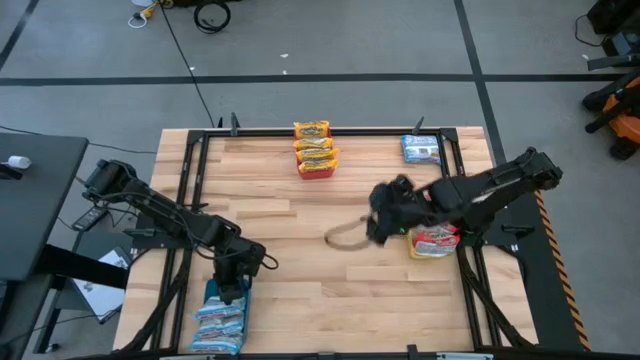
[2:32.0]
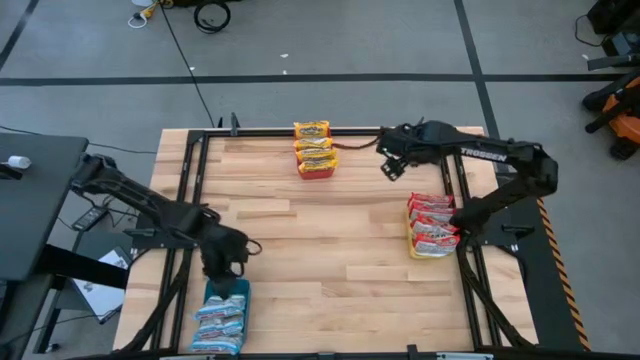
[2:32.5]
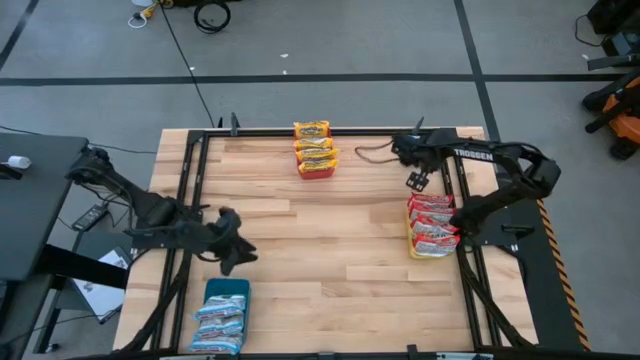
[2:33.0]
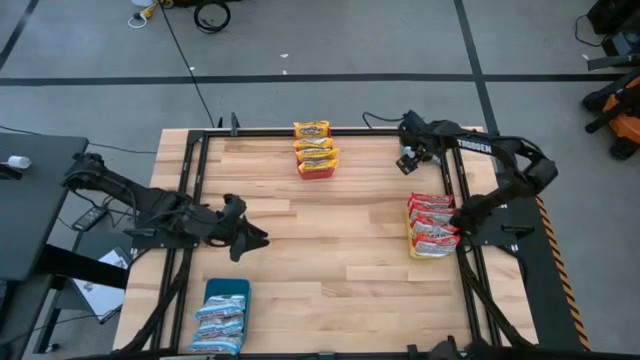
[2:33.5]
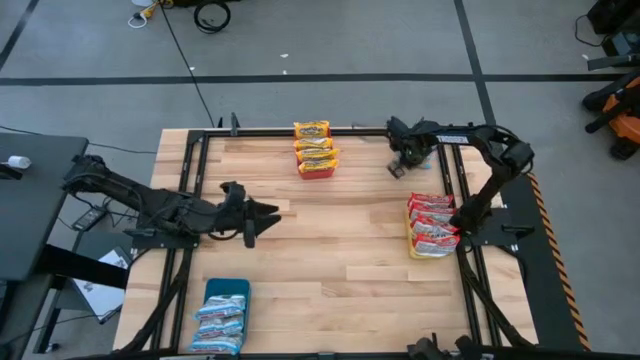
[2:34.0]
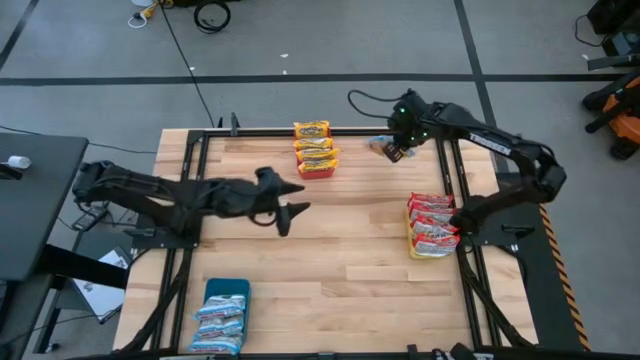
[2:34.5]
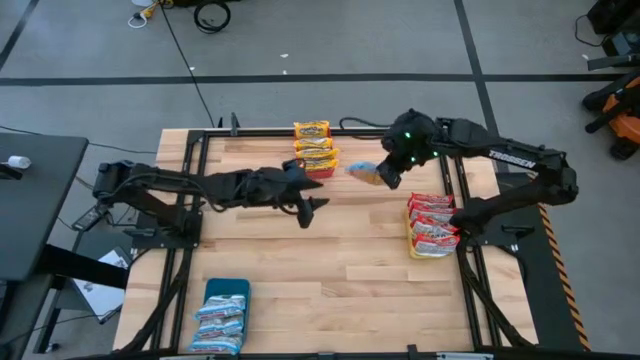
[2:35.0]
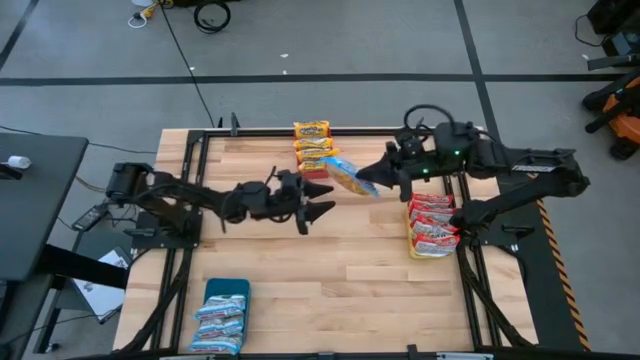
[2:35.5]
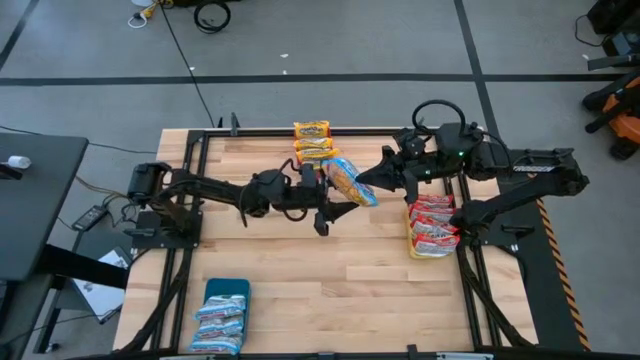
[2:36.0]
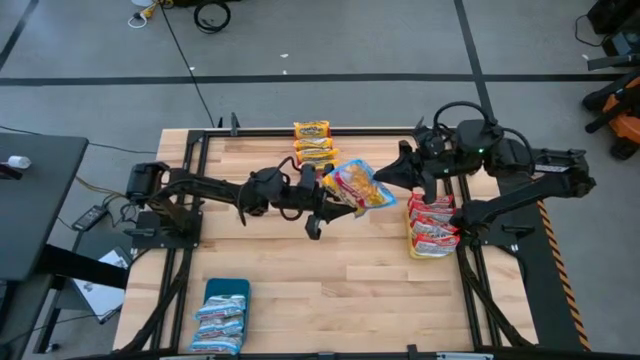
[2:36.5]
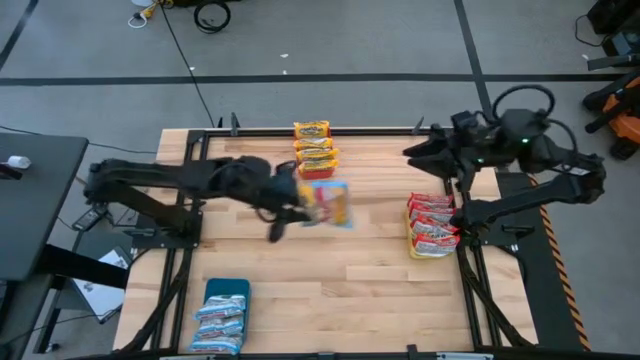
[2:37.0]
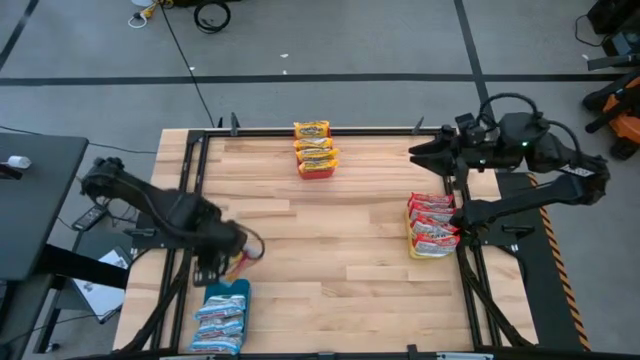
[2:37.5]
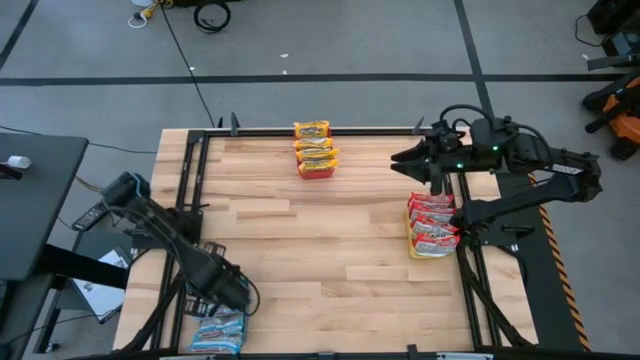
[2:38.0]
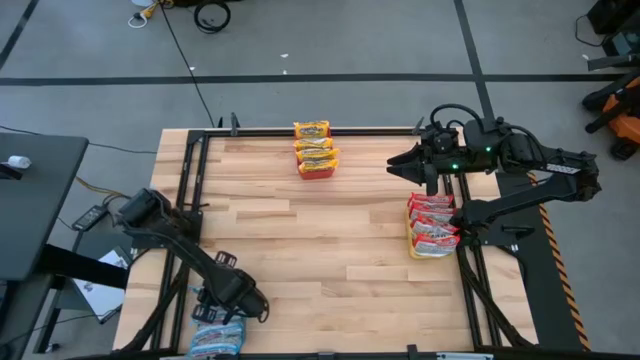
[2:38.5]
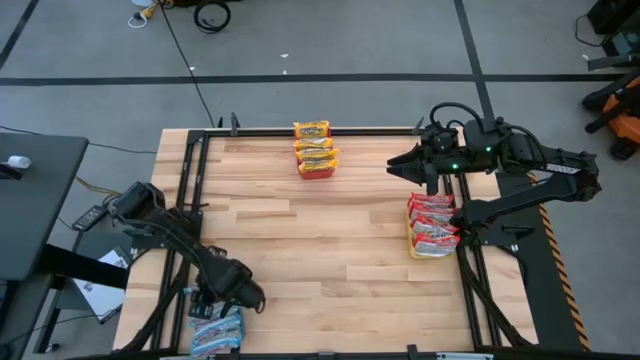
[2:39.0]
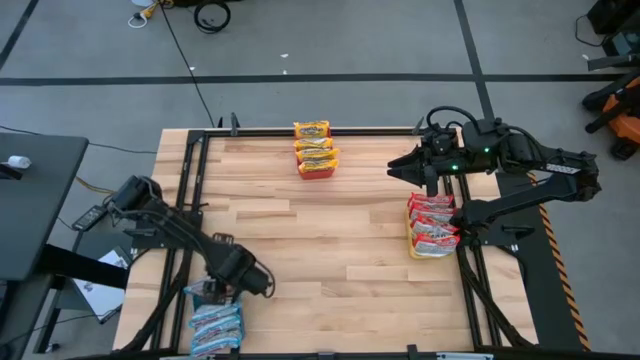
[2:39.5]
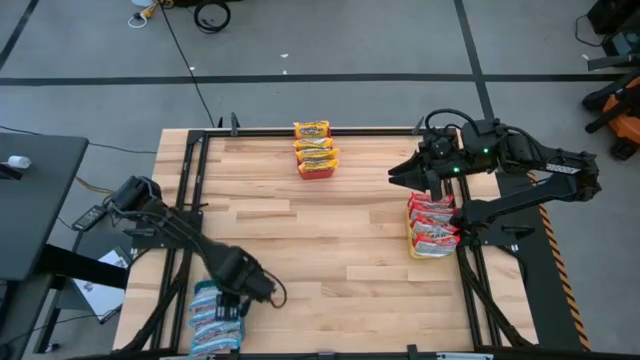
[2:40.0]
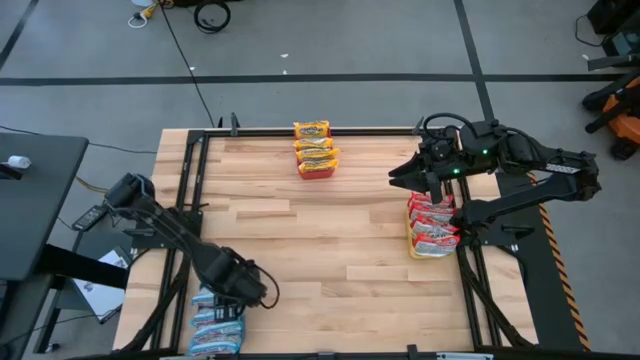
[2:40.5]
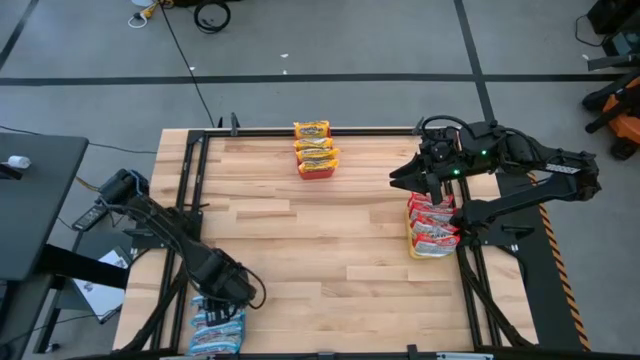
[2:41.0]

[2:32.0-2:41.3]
Task: Sort Maruchan noodles
Put the blue noodle pack into the blue bin

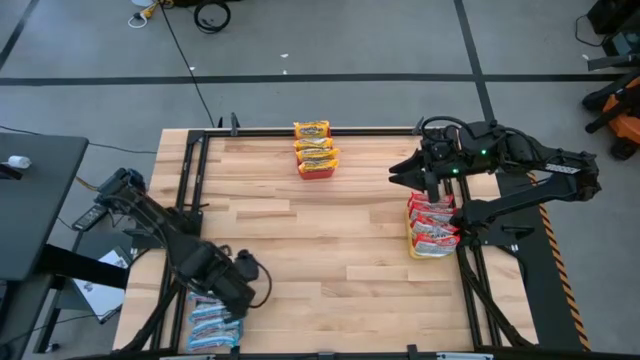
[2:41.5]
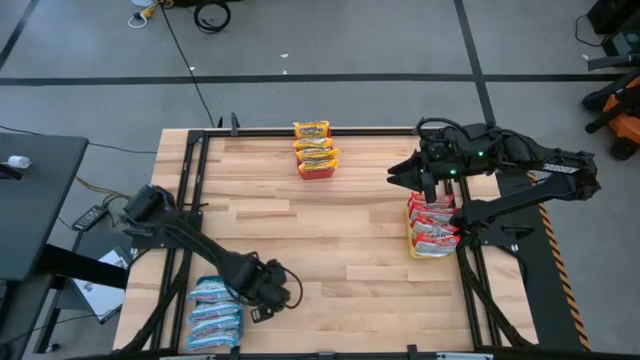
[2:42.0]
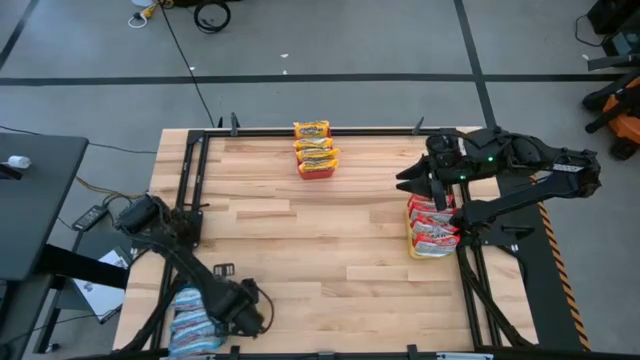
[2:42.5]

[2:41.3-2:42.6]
Adjust the blue bin

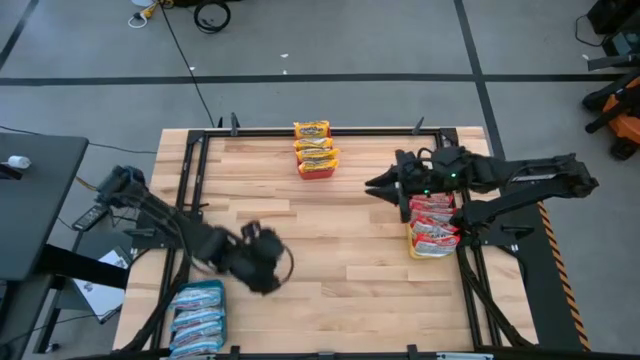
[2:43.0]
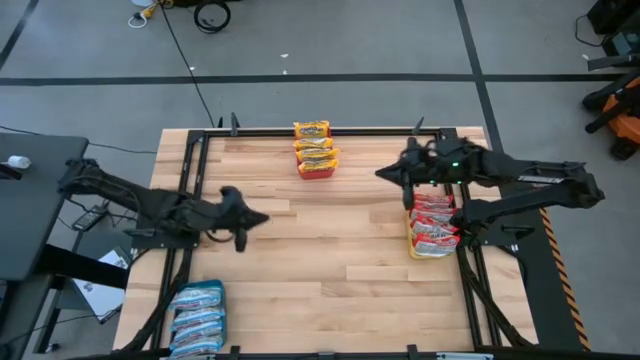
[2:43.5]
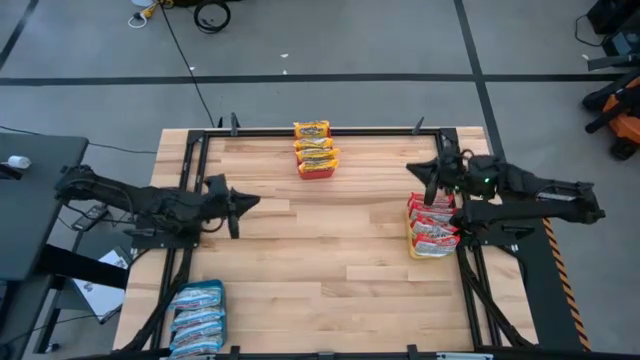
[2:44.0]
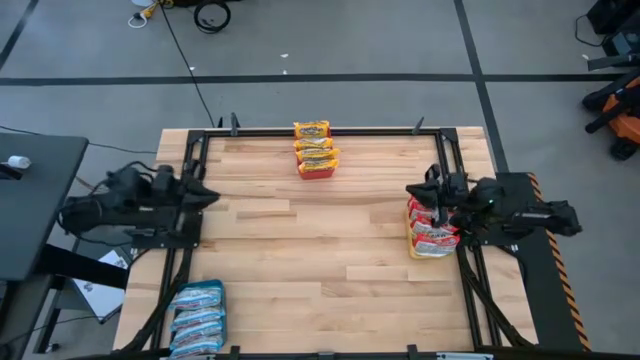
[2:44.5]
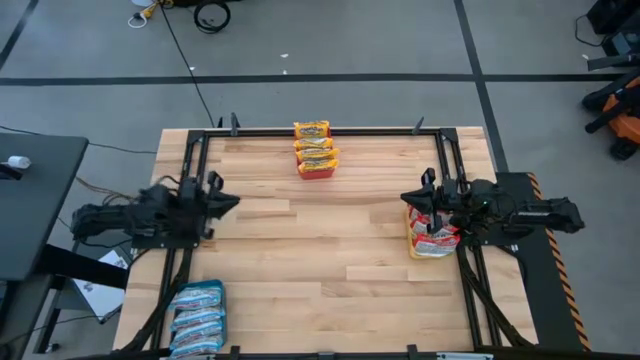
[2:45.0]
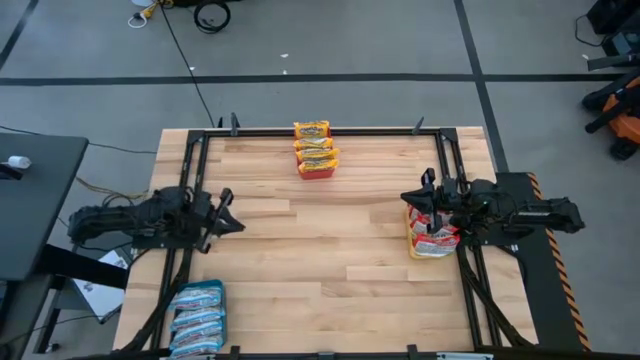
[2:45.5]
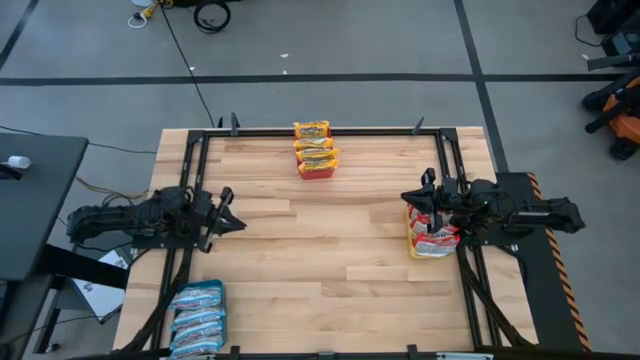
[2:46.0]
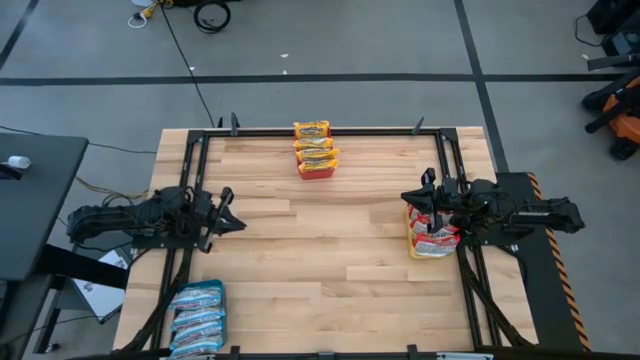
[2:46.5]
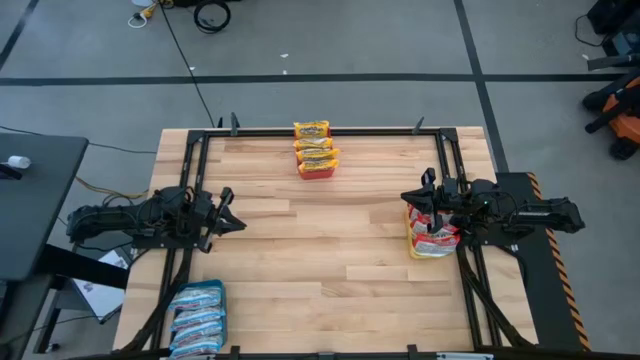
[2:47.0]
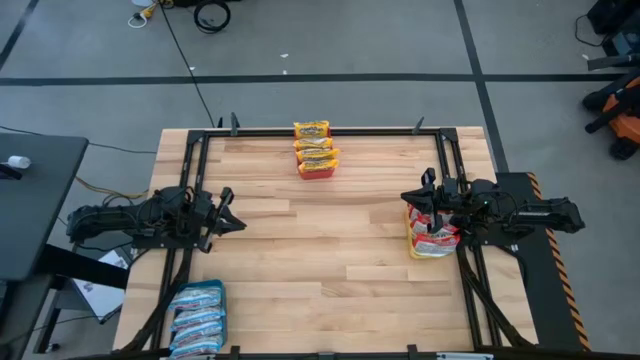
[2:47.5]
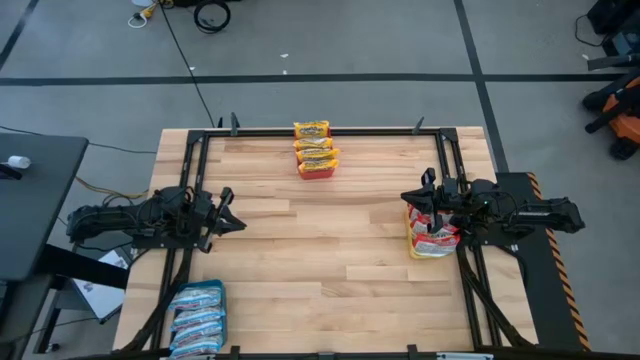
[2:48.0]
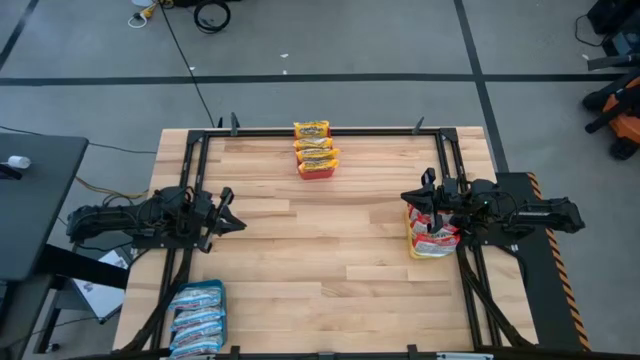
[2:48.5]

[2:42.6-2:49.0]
Return to Home Position

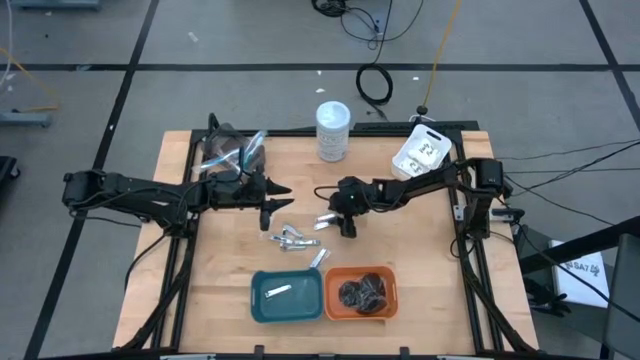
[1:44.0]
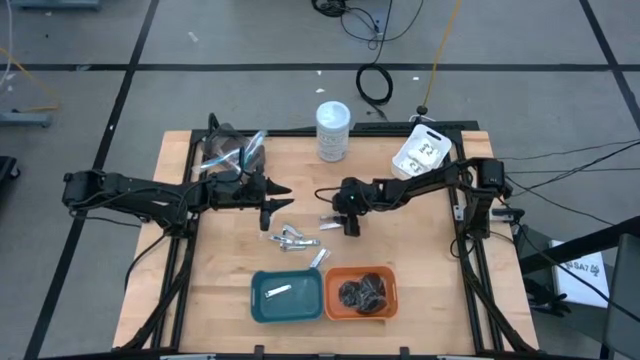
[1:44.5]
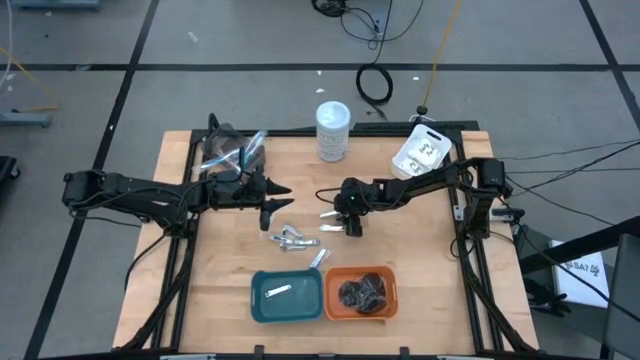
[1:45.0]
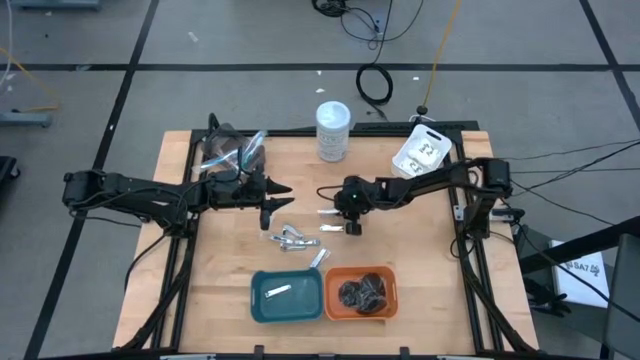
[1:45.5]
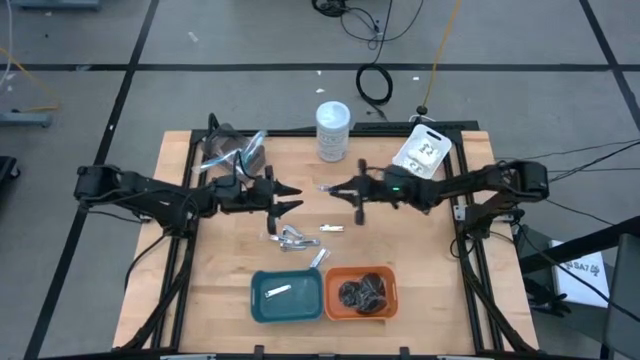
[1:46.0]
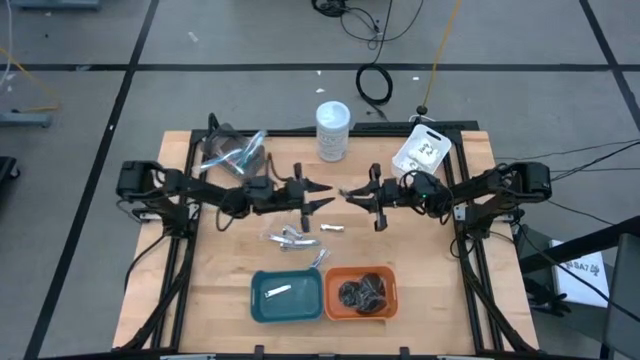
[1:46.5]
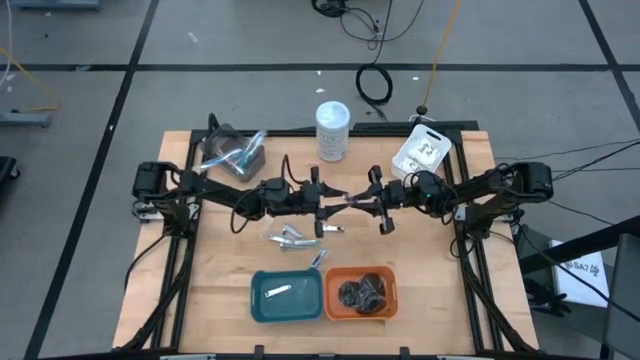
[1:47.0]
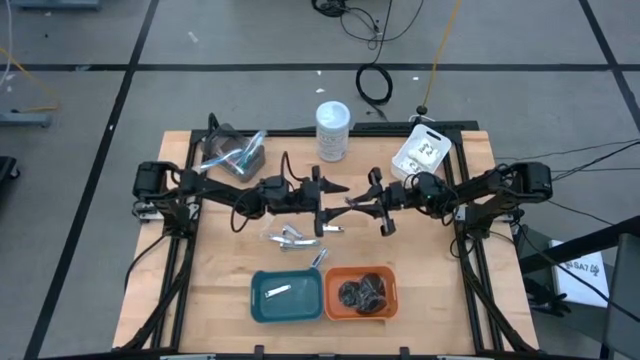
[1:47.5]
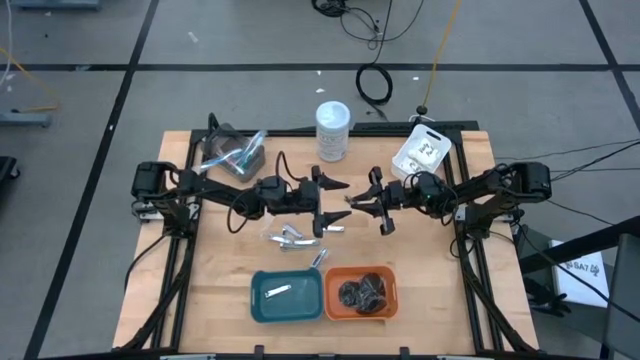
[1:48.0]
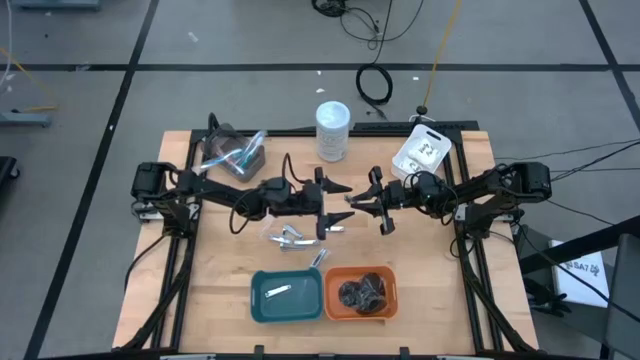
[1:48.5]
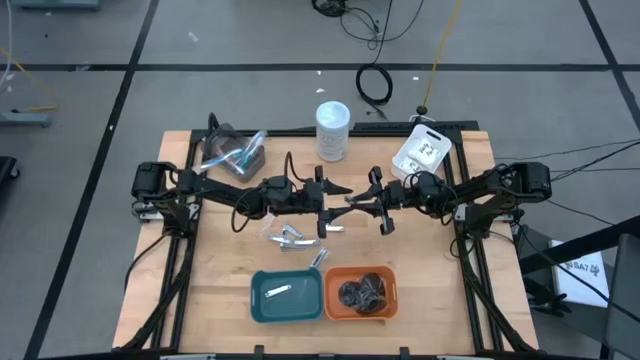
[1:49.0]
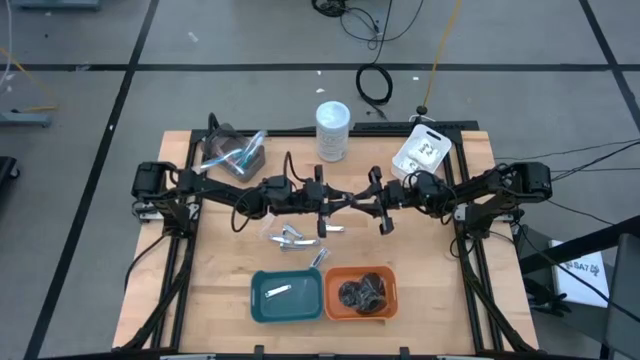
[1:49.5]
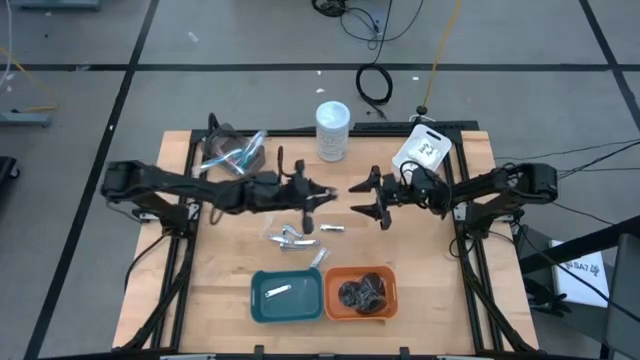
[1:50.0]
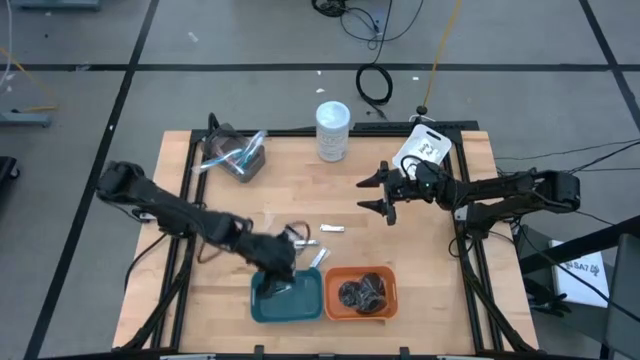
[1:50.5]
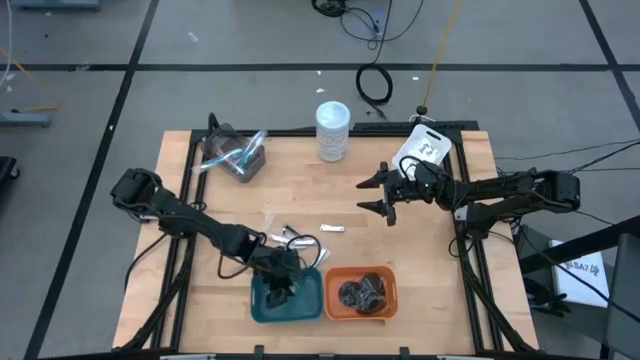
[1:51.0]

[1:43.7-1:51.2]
Task: Pick & Place Travel size toiletries
Put the silver nail cutter into the green bin
